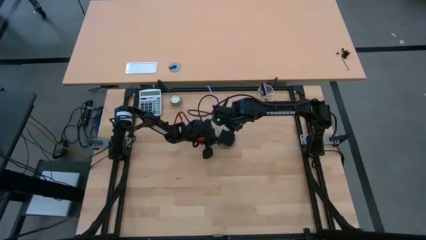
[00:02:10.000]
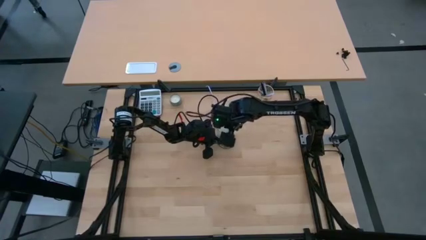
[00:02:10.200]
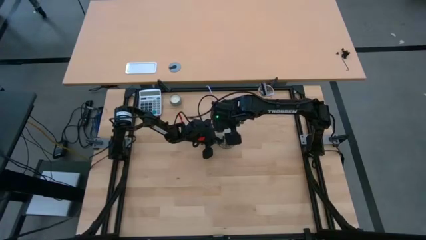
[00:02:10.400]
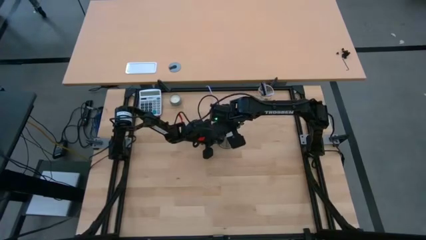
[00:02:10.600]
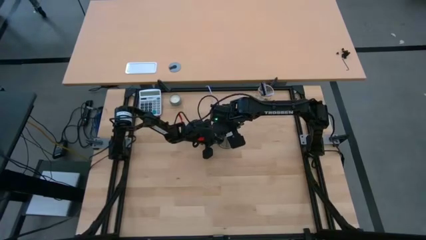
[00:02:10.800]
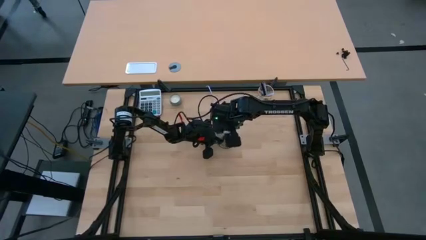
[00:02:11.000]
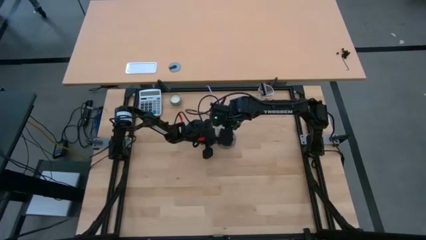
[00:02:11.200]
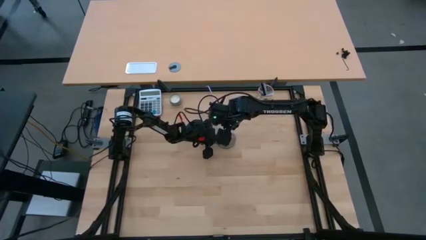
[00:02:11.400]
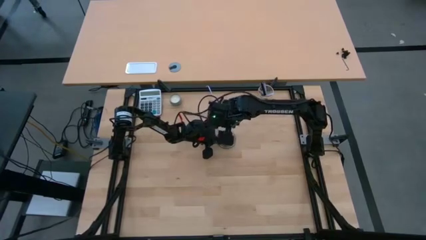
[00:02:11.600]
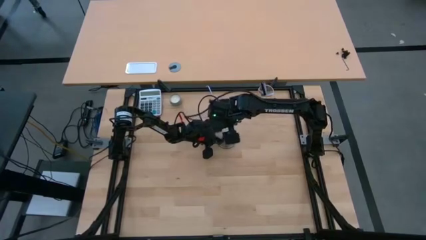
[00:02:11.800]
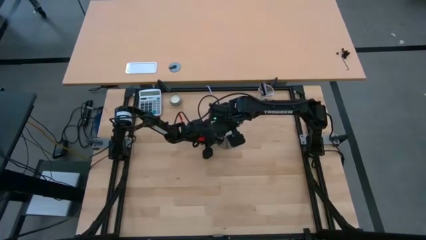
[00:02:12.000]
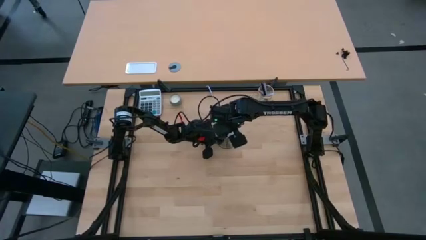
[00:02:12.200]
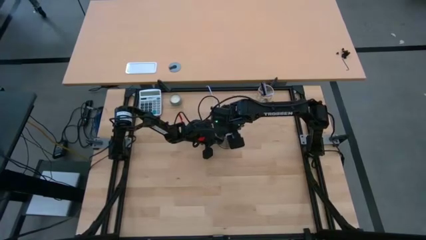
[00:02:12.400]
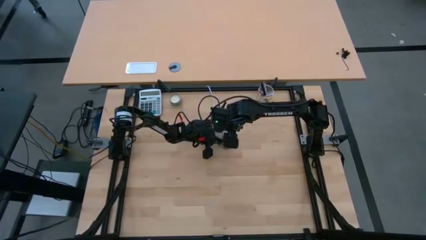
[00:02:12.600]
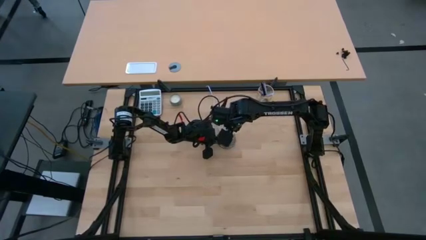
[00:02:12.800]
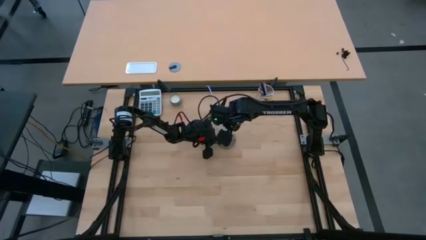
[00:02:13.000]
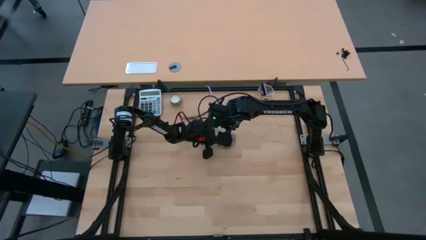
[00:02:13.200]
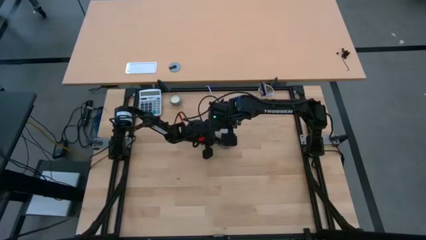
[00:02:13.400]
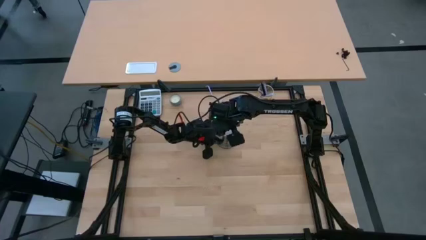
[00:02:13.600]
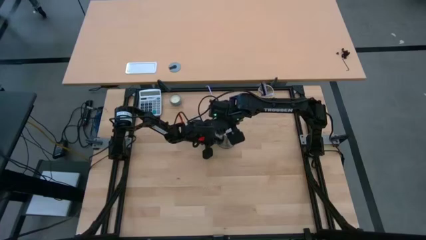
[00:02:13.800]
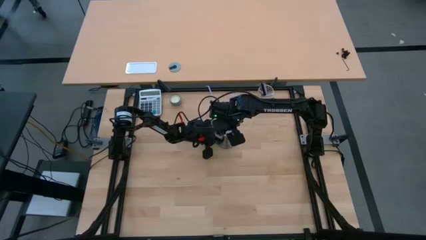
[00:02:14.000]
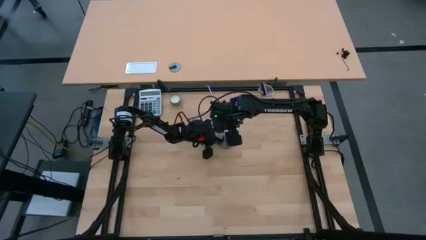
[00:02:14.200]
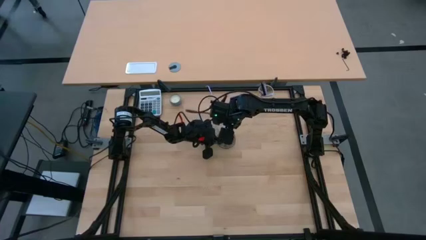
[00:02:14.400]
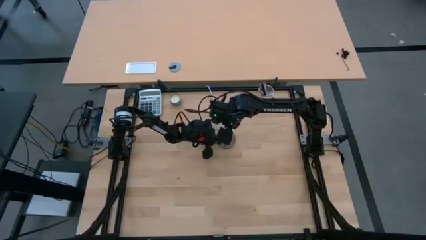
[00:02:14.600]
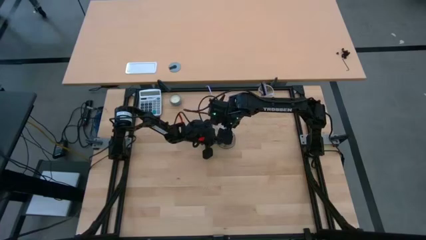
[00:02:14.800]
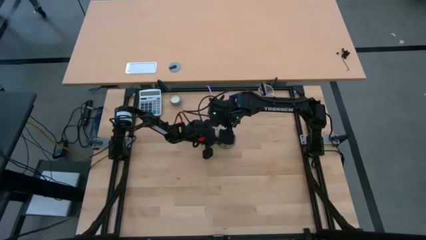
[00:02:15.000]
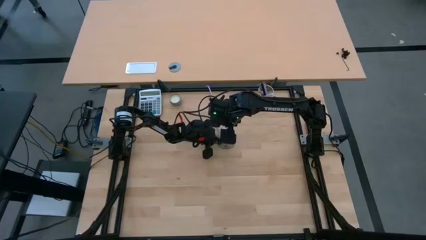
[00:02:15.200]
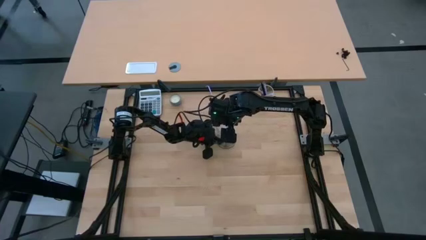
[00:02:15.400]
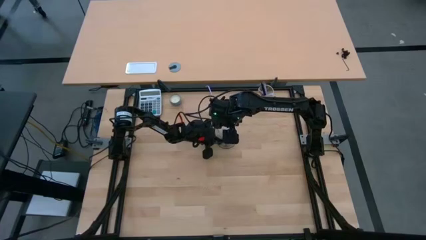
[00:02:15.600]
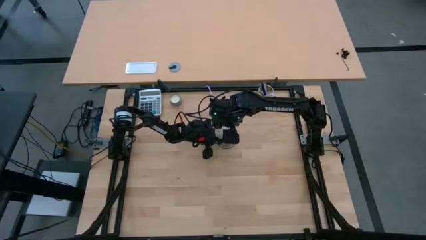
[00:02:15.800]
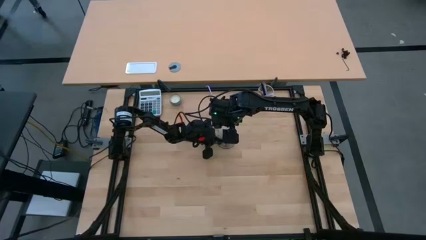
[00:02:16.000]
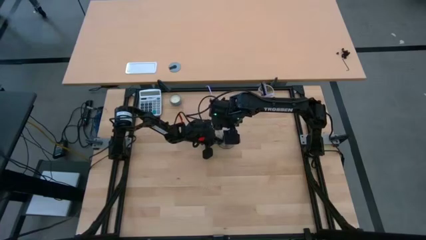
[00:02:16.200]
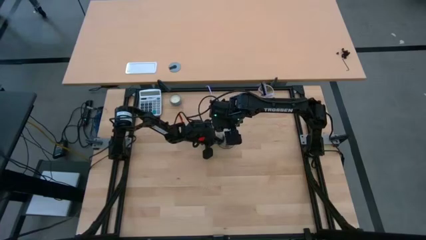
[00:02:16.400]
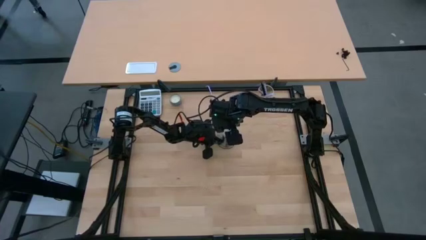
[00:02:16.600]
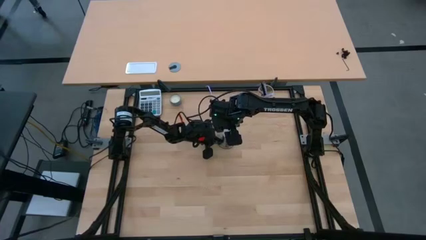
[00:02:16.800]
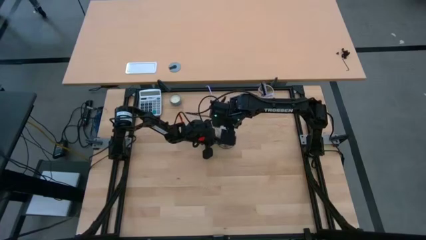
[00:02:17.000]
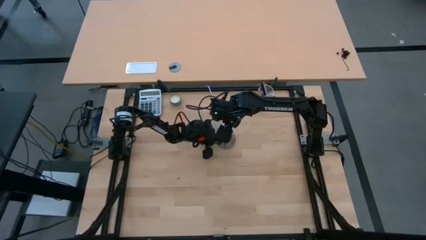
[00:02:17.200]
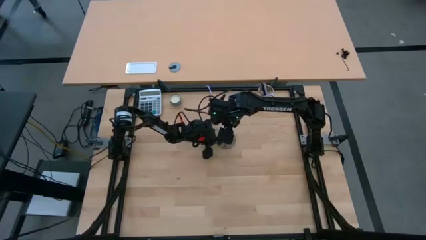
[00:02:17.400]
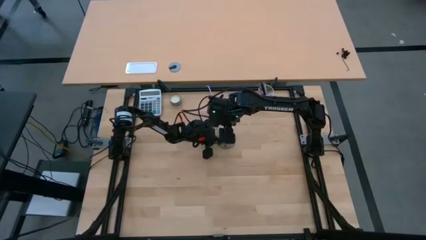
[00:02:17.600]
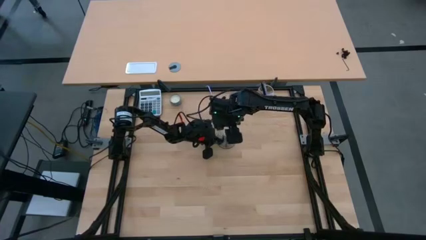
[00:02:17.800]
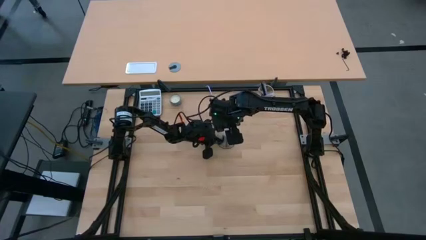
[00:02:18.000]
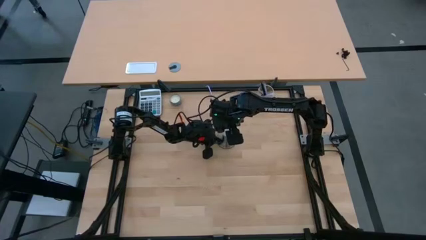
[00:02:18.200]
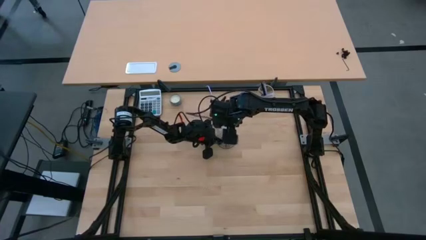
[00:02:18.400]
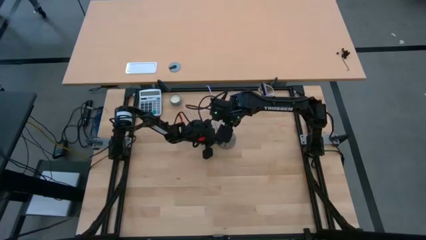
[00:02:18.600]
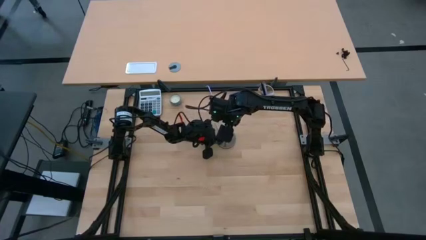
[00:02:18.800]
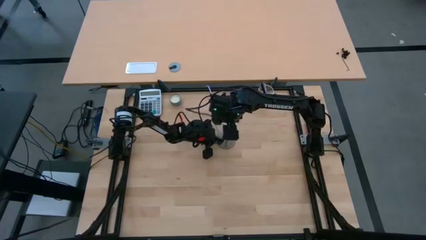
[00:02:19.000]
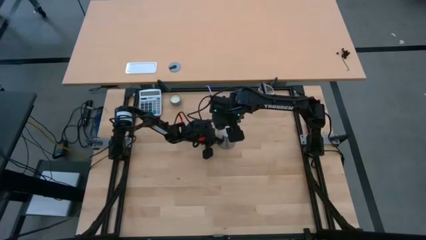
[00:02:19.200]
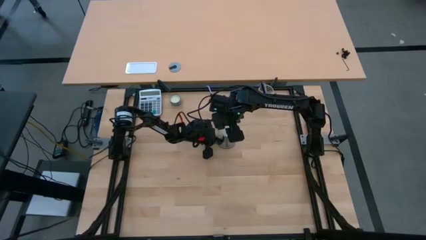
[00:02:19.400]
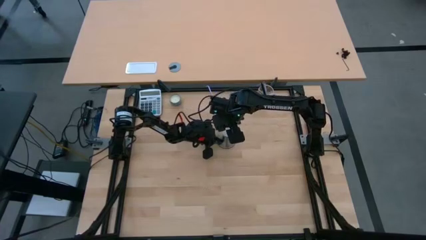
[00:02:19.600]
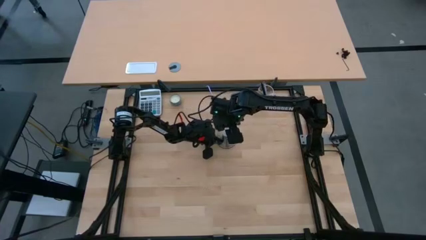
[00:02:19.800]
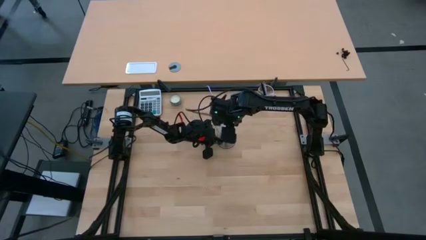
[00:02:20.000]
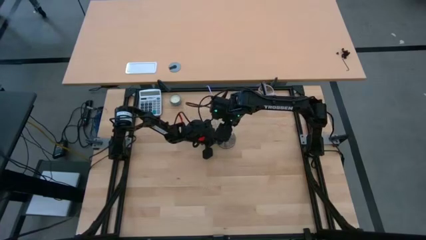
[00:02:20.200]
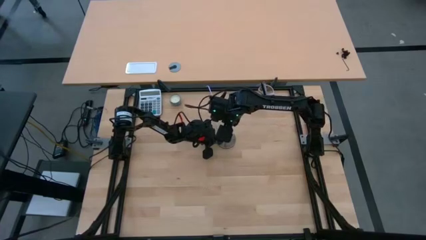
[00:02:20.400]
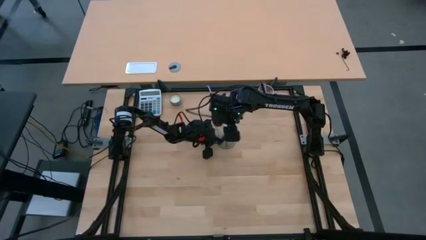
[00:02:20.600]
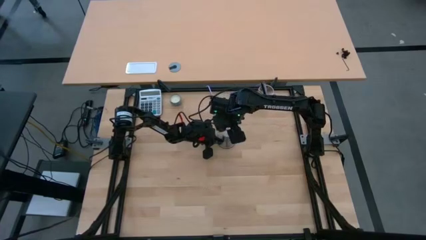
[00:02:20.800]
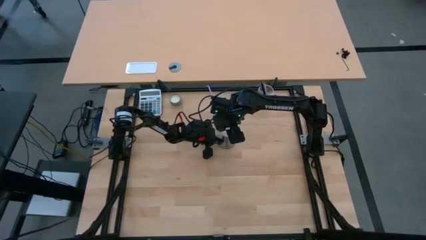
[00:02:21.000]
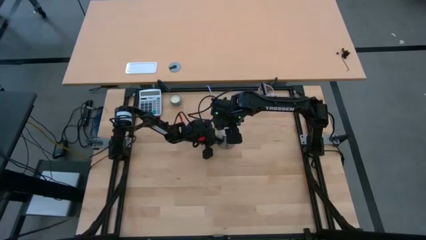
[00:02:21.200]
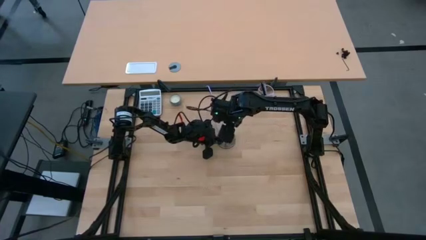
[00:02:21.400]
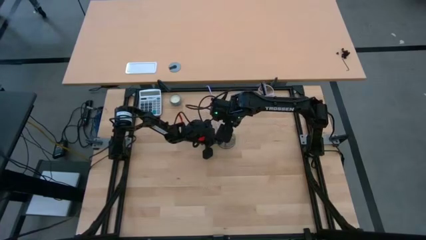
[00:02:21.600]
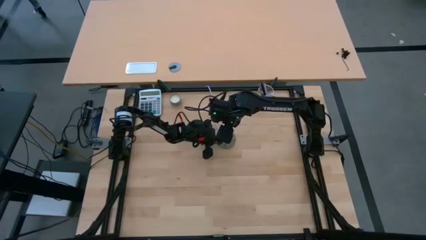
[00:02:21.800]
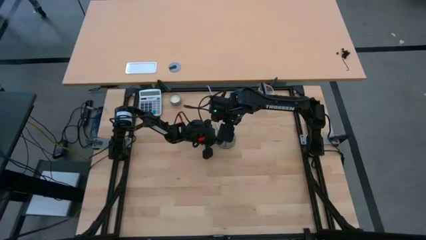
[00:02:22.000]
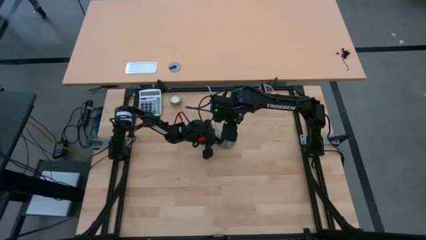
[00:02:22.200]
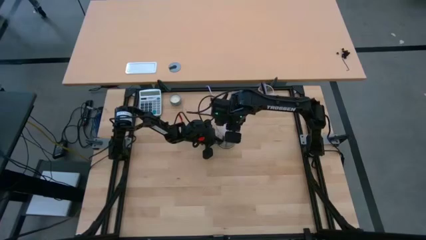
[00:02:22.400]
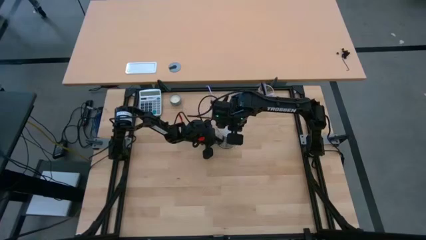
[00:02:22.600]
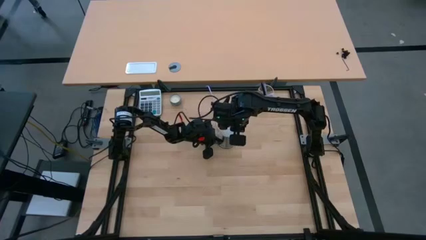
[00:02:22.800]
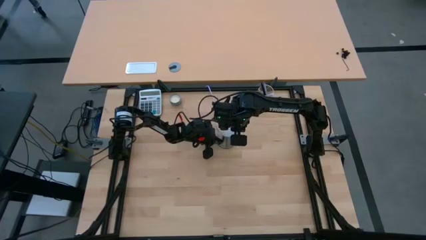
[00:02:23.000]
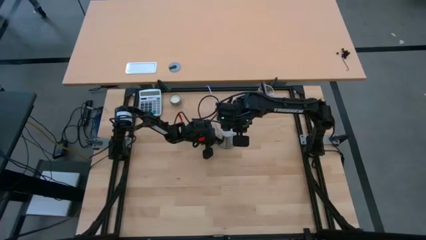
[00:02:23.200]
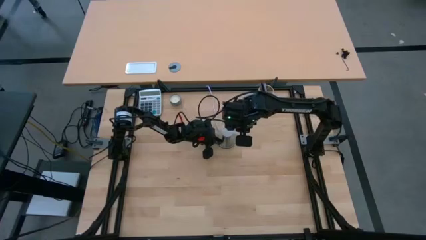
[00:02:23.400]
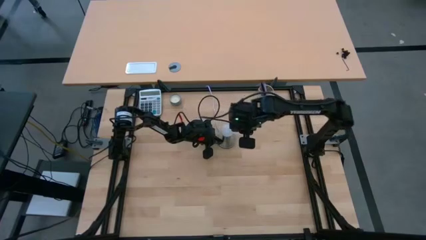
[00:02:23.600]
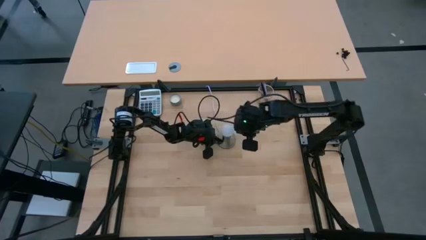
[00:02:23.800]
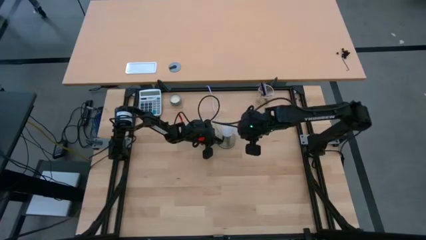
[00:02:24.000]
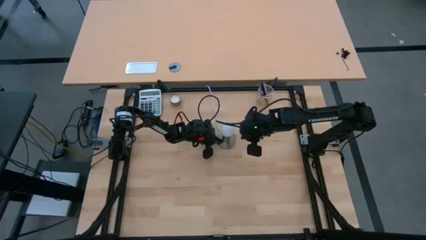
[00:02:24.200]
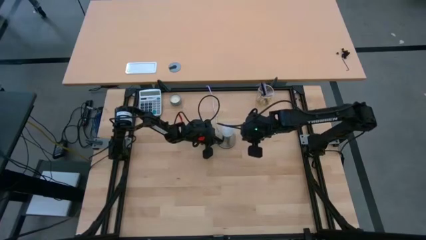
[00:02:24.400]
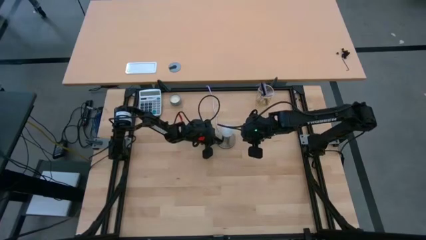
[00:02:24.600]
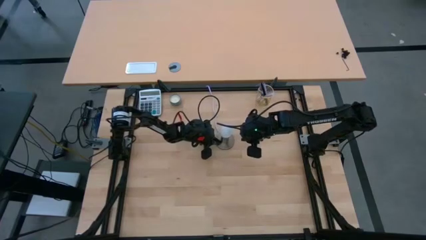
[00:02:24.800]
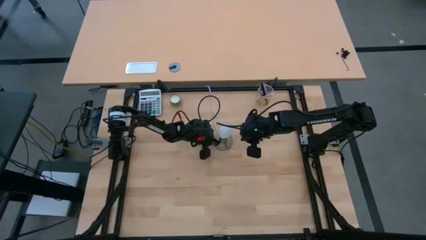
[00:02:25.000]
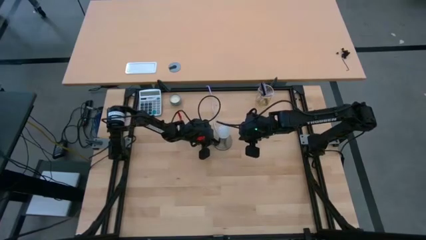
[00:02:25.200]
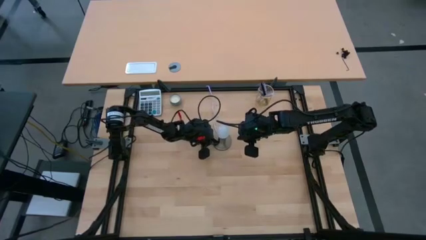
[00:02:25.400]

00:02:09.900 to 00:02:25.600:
Task: Screw lightbulb
Insert the lightbulb into the lamp
